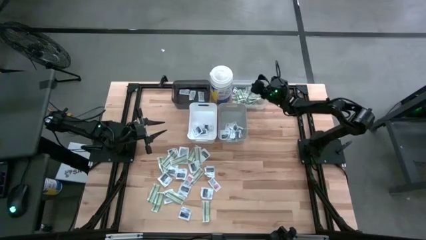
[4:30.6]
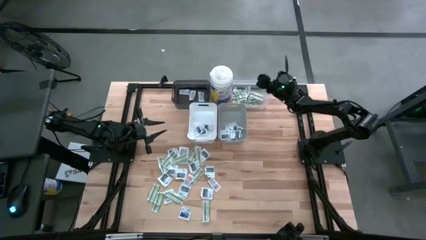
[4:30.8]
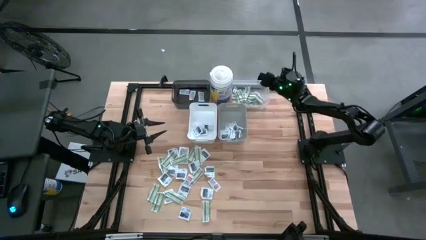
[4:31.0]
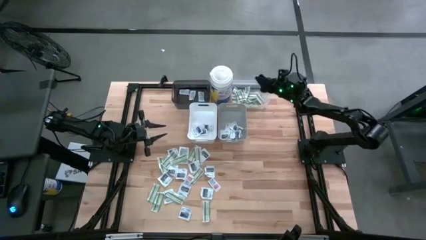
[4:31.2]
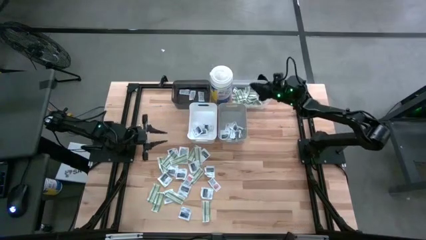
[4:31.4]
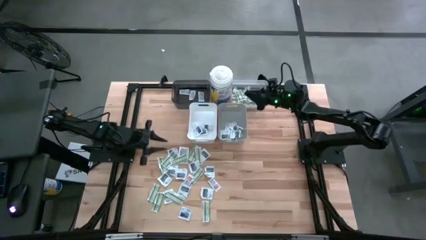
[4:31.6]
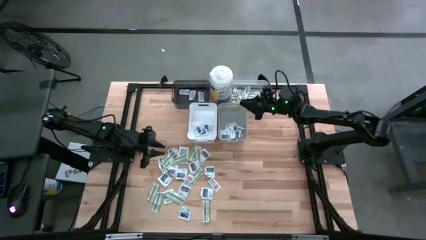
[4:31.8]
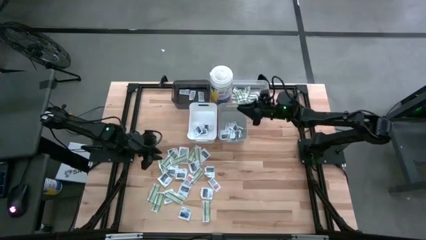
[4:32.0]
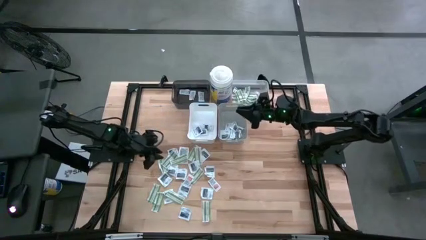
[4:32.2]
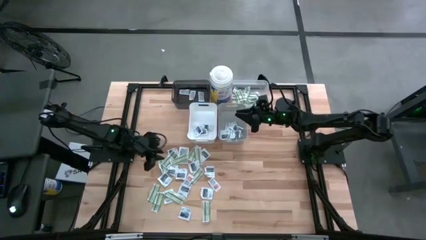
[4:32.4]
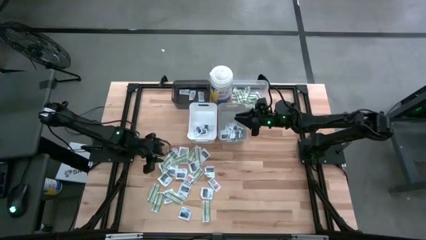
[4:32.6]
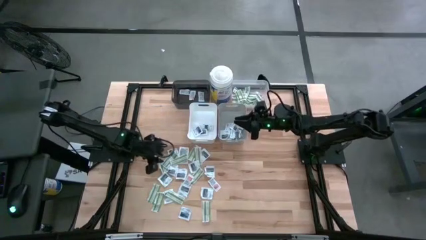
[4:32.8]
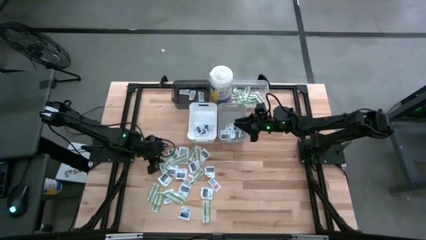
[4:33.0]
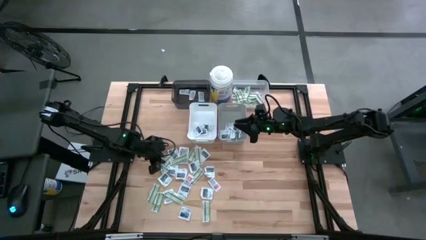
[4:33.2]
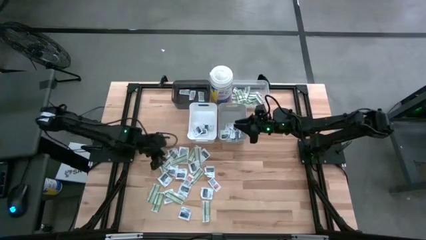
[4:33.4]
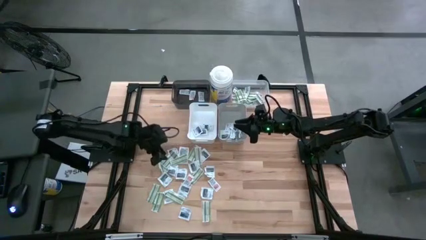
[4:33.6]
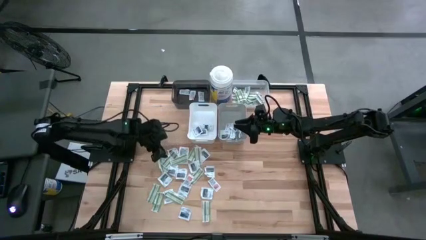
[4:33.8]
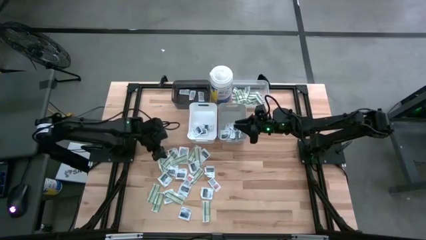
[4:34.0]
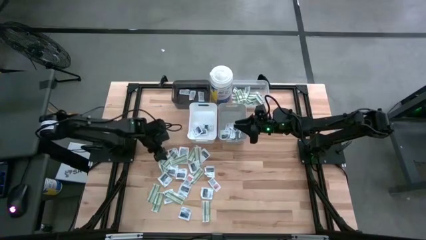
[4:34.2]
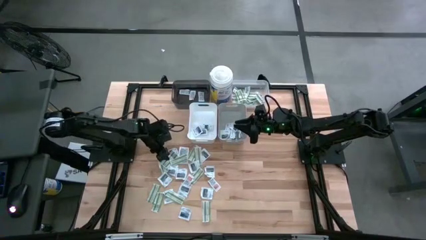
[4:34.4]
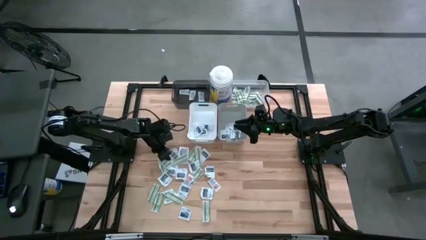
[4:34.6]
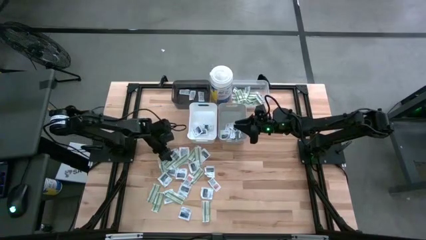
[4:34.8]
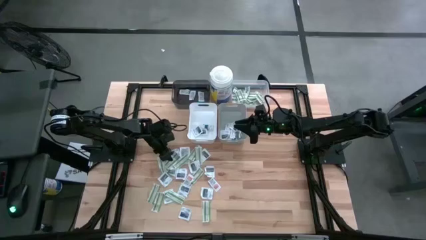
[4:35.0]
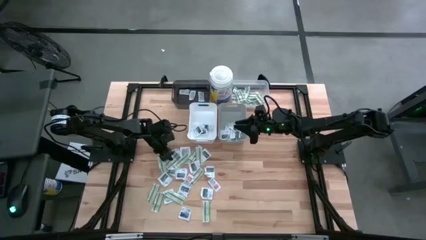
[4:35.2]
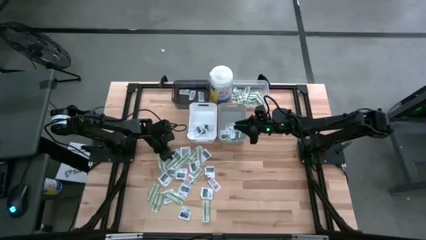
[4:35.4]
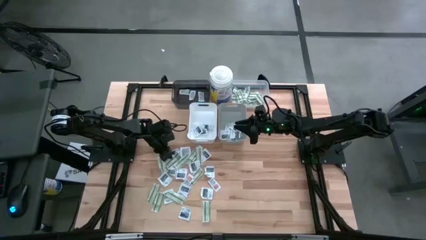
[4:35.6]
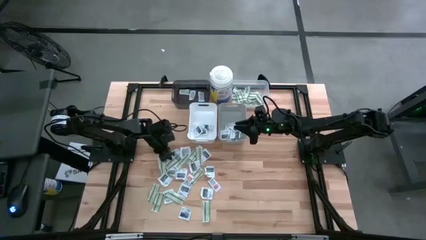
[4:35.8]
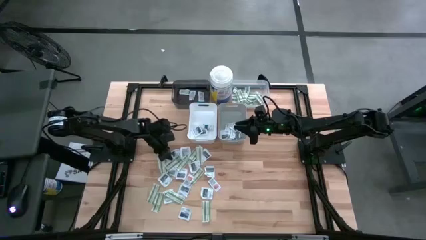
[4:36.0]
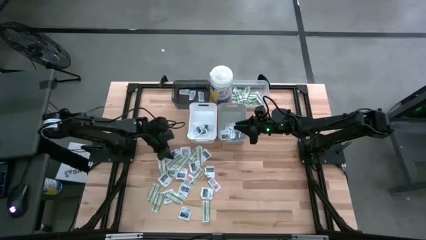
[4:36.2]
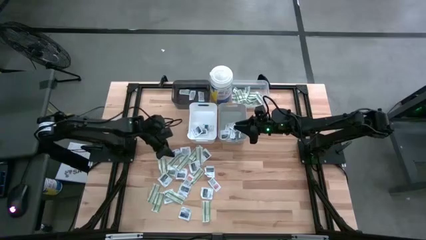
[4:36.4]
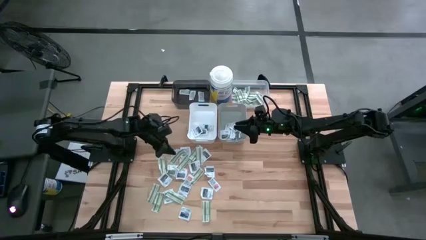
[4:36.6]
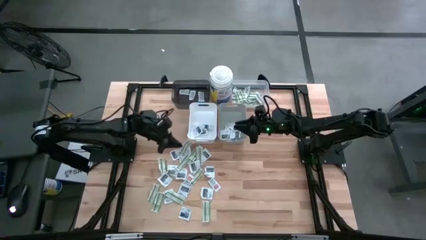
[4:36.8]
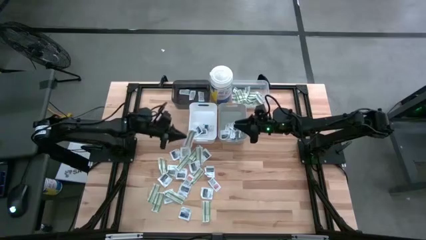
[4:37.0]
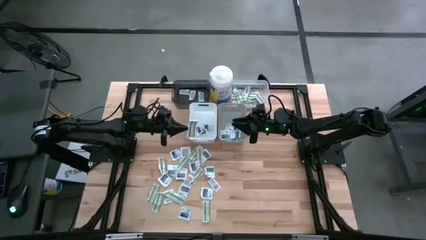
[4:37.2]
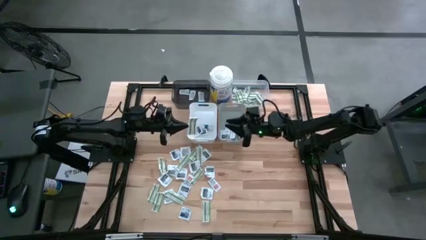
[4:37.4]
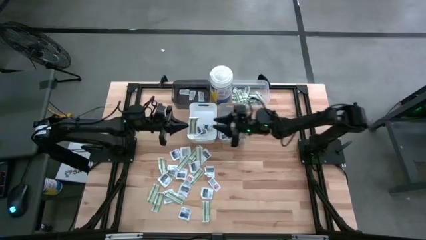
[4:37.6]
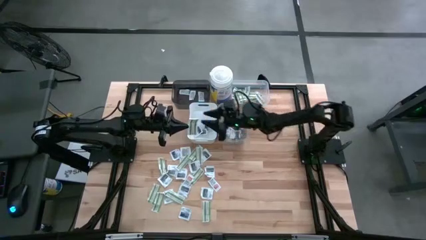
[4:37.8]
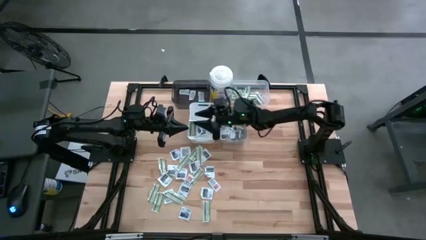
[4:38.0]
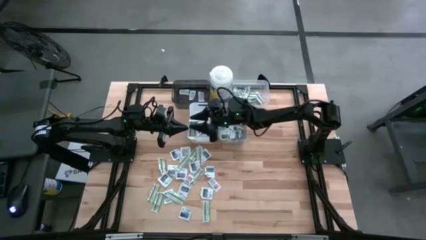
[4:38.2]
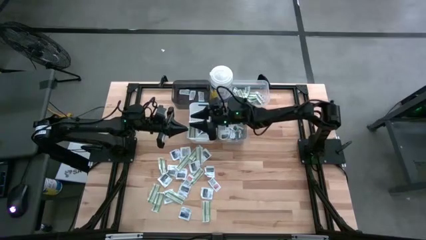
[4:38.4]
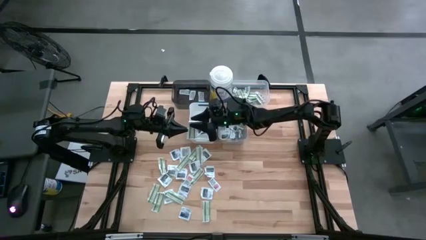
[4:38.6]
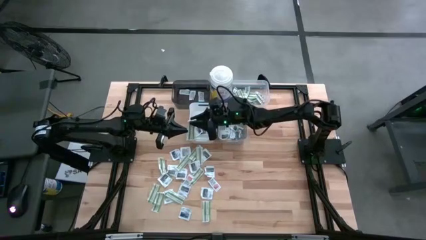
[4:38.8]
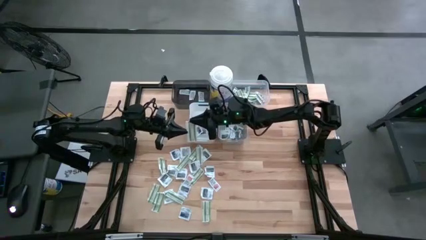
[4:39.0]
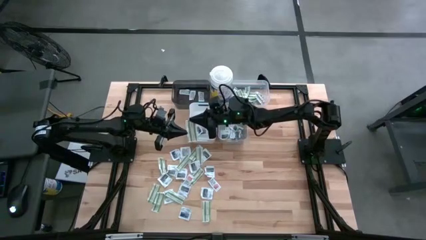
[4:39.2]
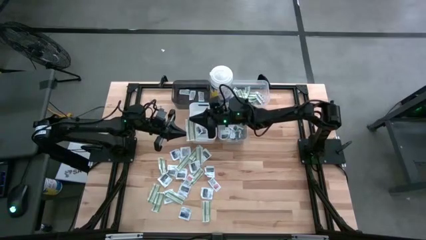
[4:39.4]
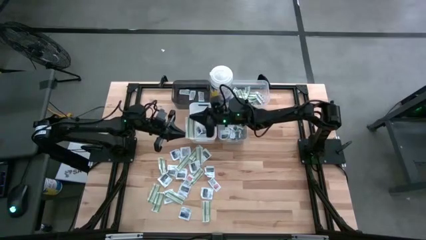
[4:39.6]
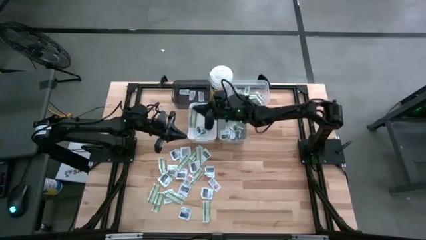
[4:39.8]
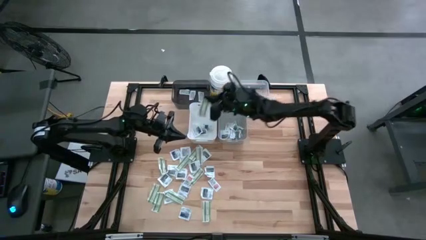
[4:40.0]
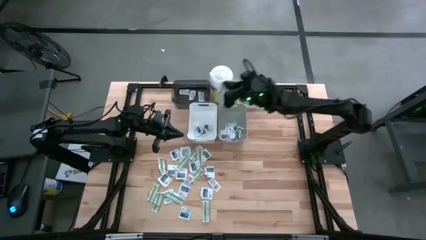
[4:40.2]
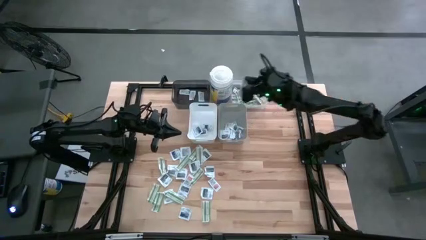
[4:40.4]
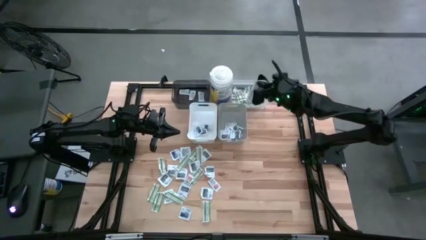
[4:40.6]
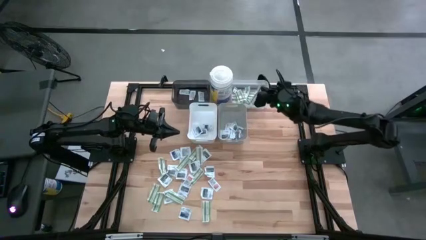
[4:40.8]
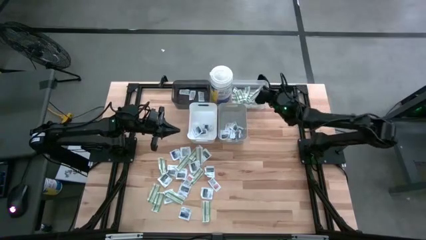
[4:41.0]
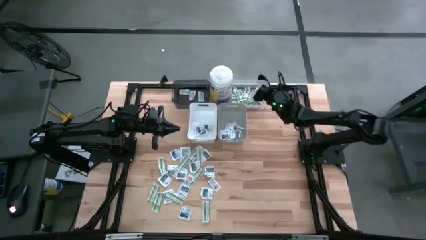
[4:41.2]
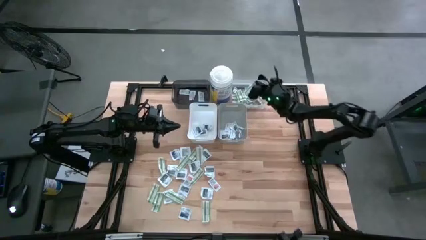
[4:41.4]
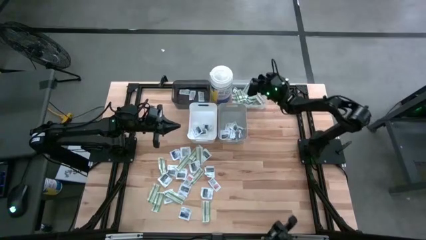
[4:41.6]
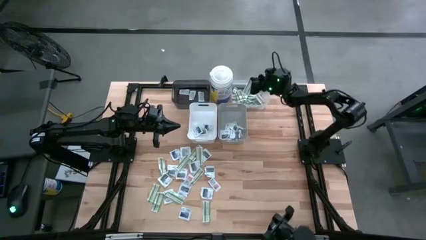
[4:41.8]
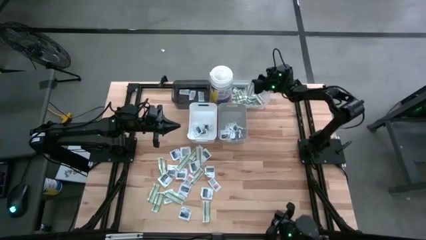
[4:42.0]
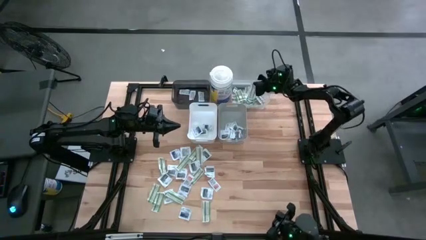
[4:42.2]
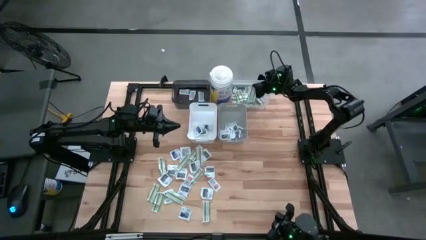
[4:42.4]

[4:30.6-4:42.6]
Task: Pick & Place First Aid Supplies
Put the band aid into the transparent bin
